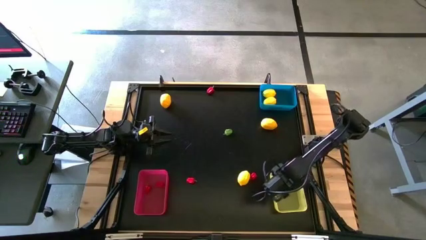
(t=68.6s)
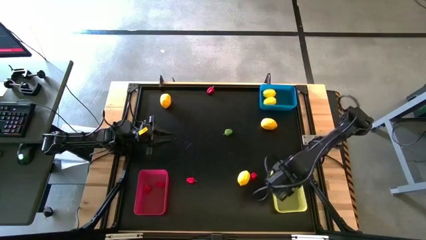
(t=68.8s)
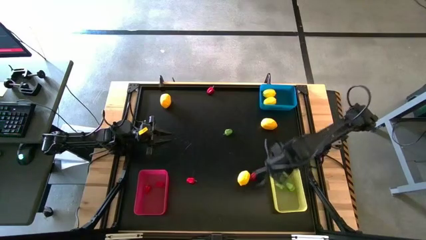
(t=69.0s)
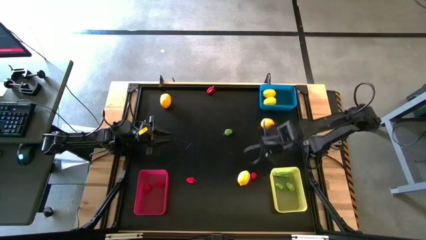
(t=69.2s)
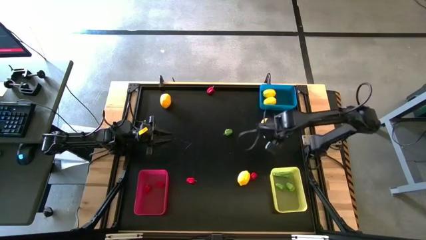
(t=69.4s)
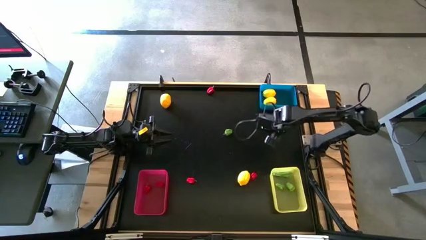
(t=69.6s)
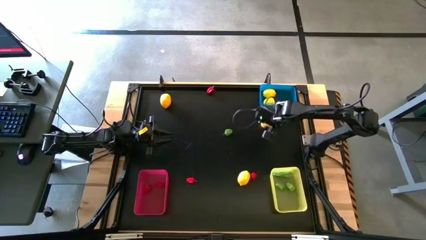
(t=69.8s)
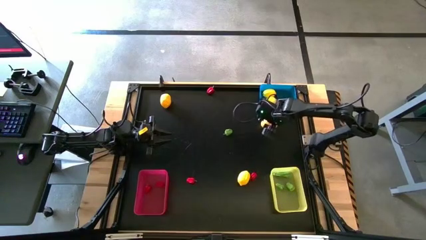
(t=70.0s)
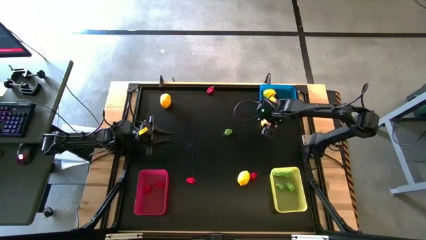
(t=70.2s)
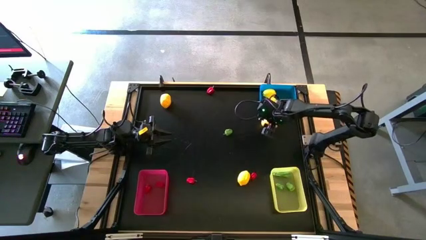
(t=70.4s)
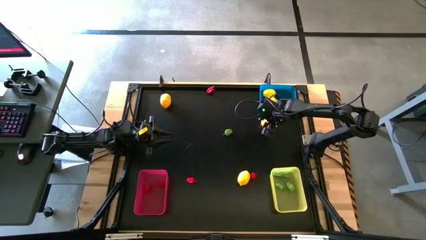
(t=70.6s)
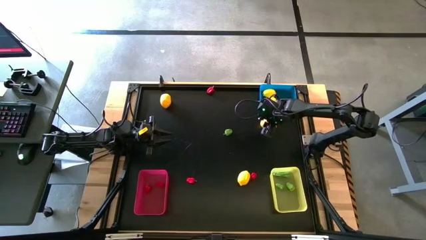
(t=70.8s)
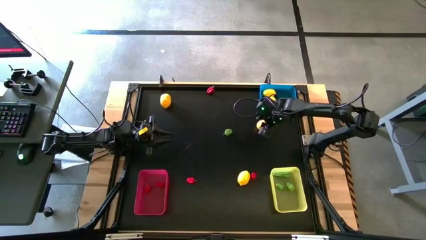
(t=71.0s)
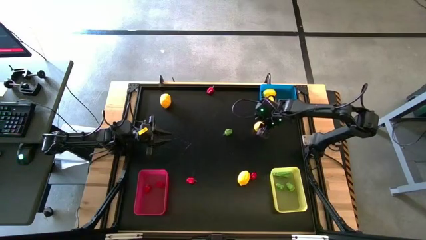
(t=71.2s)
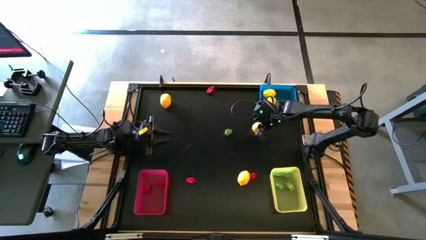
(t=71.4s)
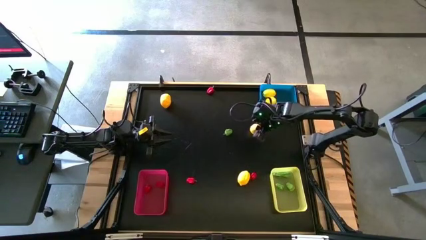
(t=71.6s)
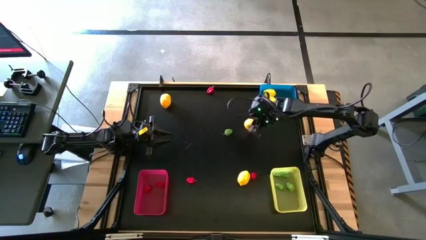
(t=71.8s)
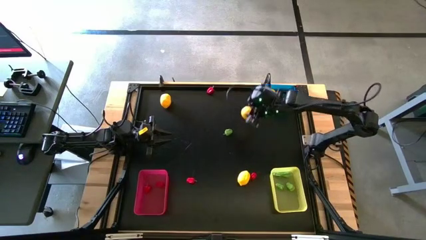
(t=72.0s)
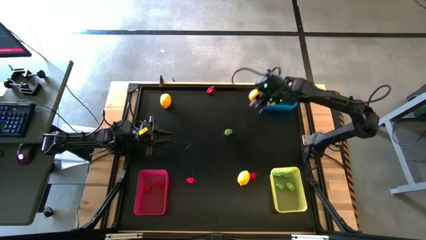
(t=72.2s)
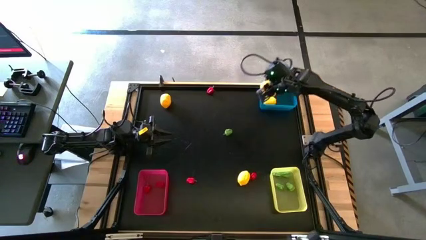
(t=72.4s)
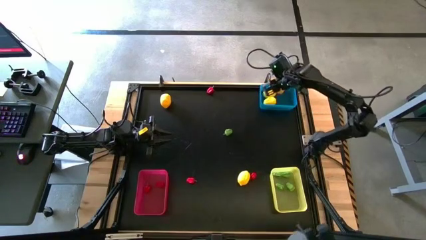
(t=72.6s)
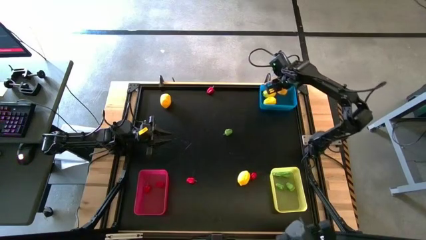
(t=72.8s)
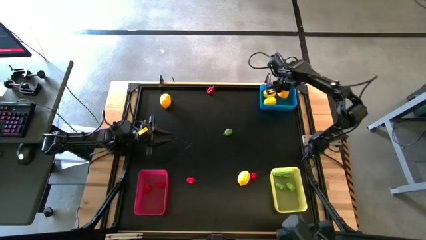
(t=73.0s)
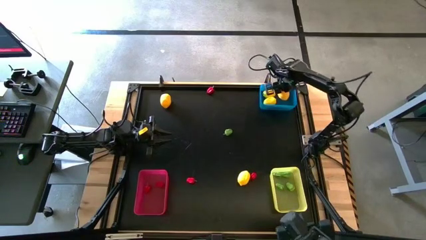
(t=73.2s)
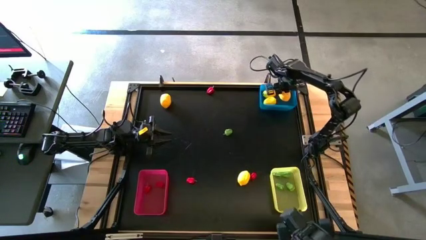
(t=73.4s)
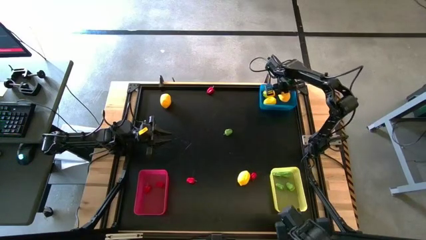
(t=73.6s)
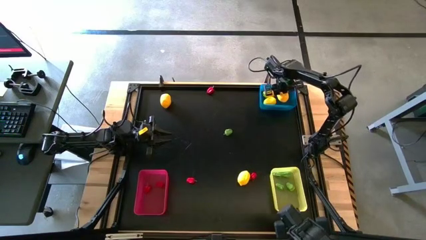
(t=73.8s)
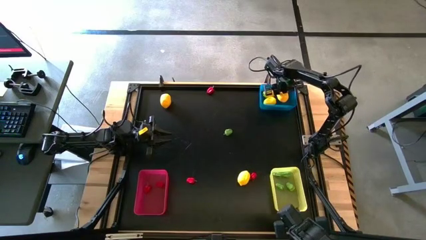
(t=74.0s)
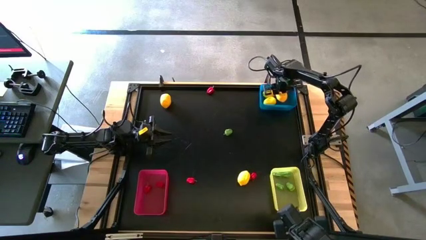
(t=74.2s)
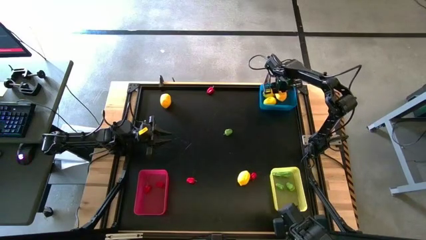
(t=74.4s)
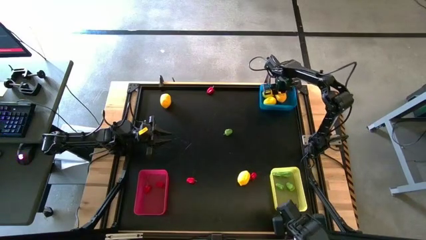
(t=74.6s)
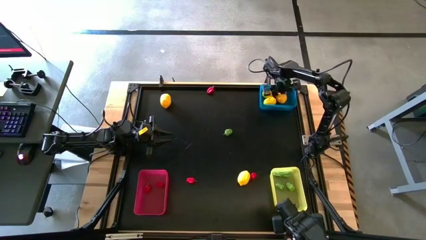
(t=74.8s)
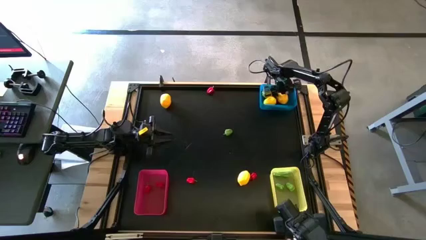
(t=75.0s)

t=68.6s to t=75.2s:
Task: Sort produce into baskets
Put the yellow lemon into the blue bin

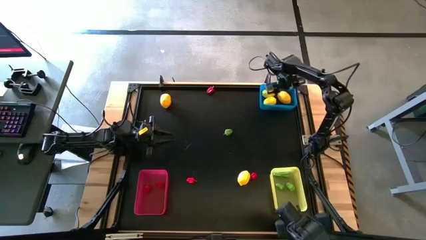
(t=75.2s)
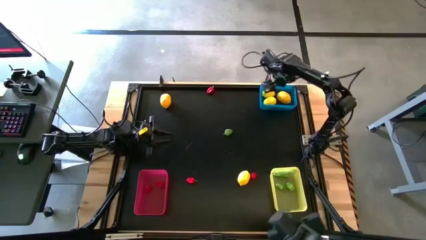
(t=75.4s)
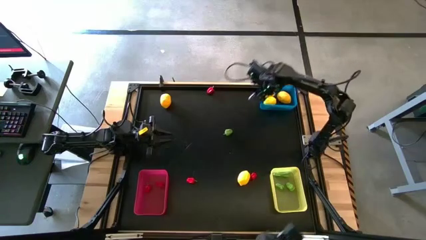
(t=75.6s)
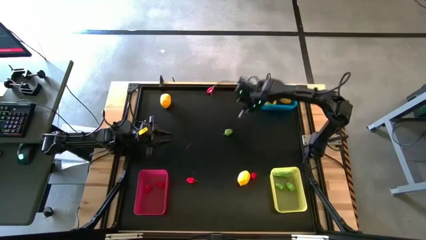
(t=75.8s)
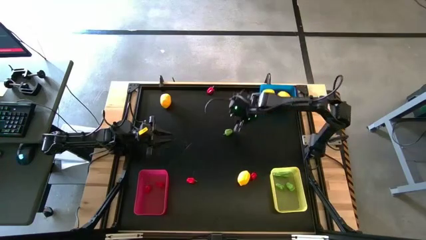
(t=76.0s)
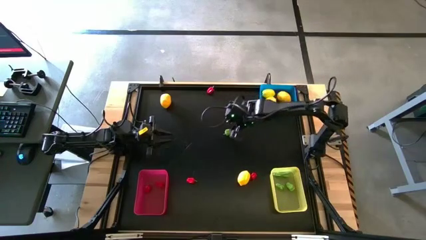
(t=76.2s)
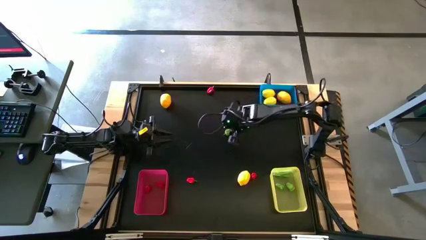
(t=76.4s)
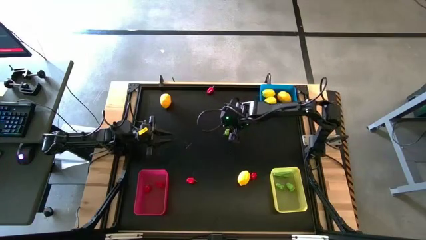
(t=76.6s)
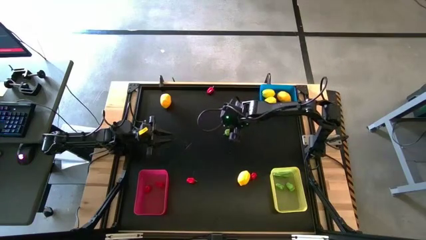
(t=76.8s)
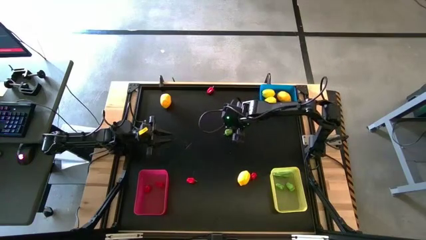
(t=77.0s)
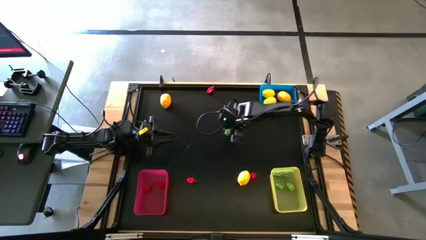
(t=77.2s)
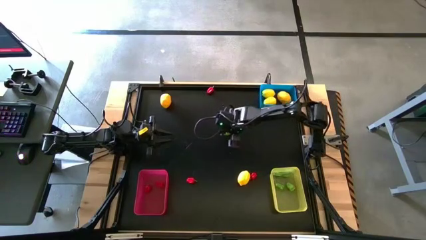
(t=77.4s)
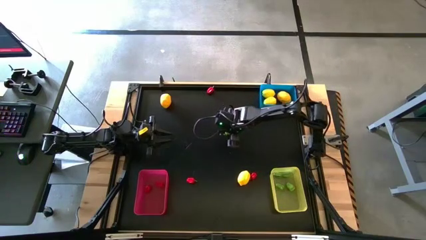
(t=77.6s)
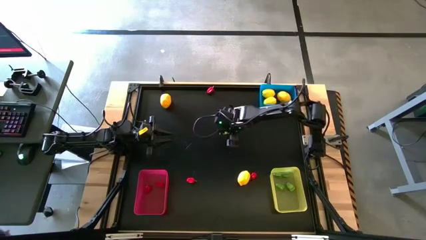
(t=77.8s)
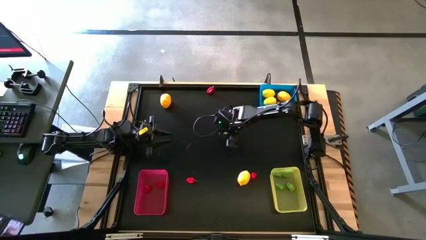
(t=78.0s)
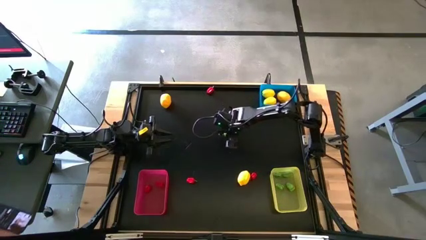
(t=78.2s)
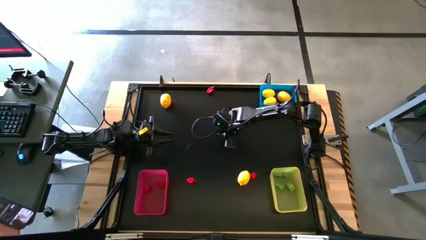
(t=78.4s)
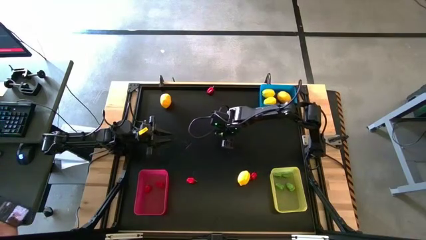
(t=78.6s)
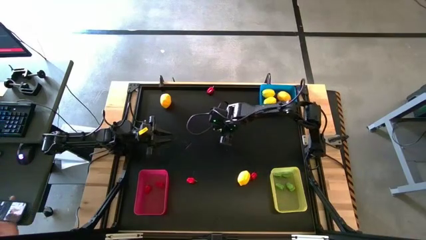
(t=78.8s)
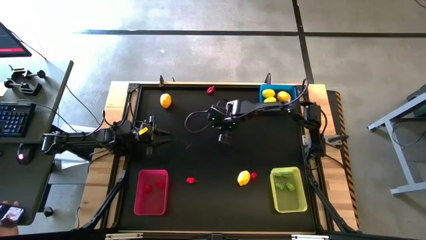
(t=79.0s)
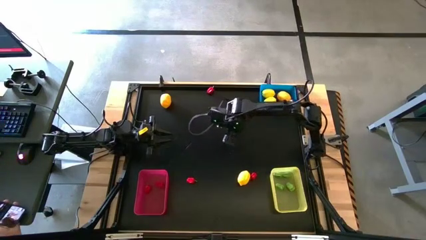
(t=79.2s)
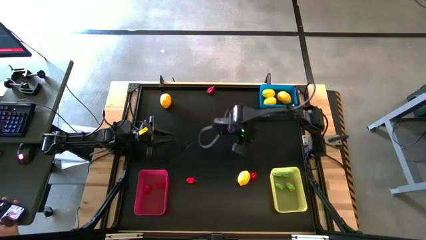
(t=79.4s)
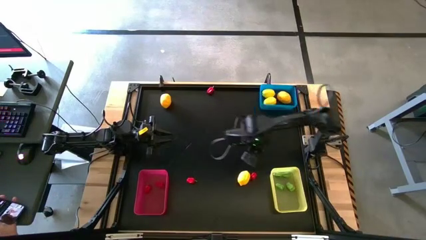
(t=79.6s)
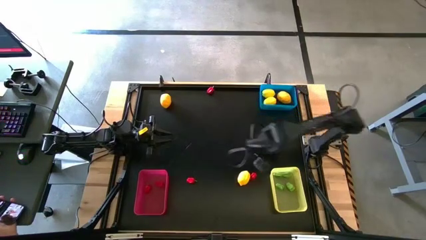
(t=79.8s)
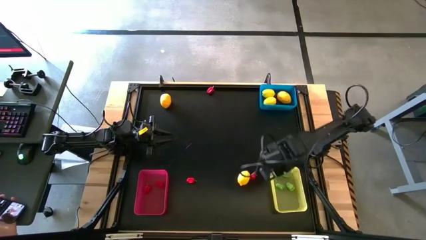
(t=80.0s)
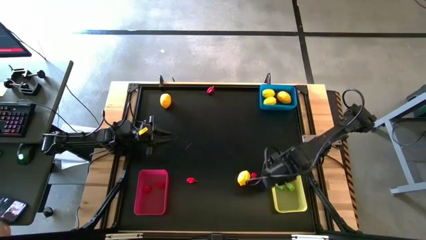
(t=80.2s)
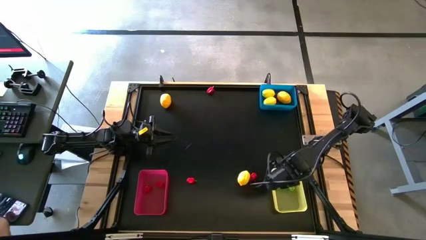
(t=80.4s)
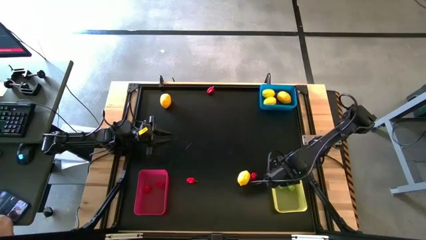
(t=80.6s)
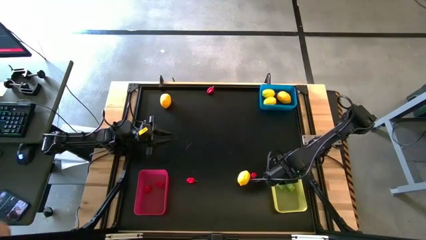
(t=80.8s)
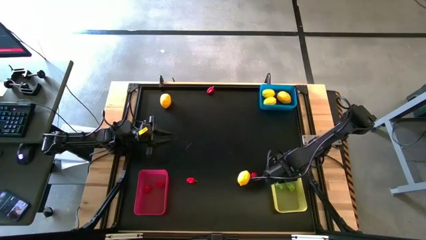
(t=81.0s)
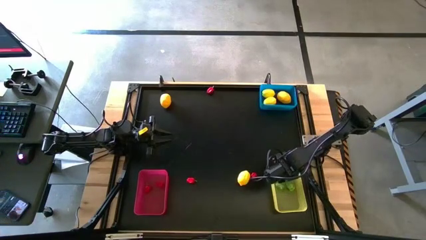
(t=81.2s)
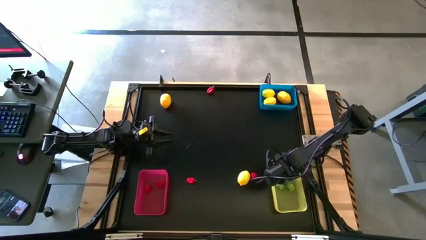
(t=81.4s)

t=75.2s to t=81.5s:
Put the green chili pepper into the yellow bin

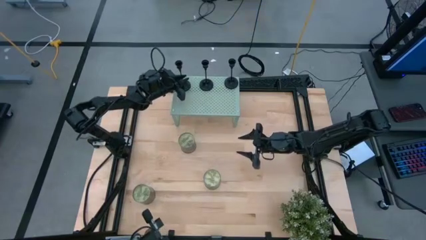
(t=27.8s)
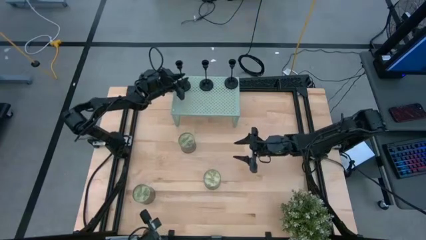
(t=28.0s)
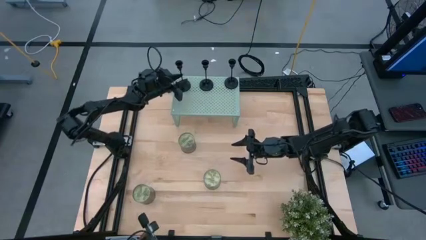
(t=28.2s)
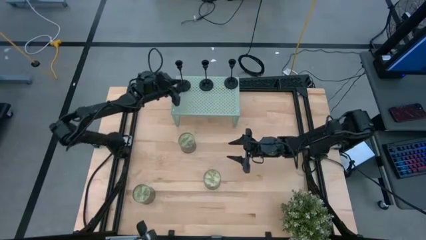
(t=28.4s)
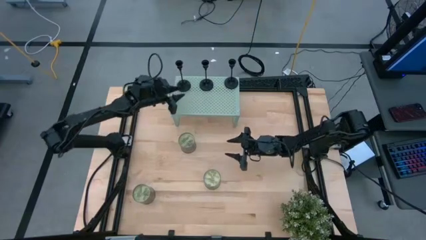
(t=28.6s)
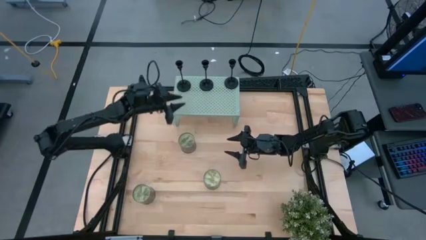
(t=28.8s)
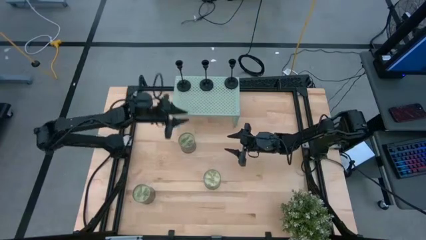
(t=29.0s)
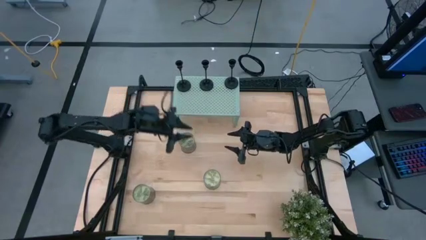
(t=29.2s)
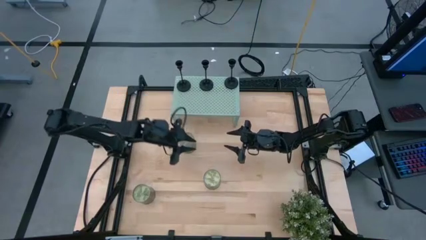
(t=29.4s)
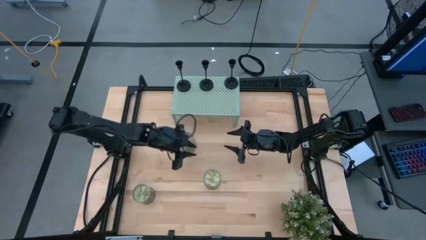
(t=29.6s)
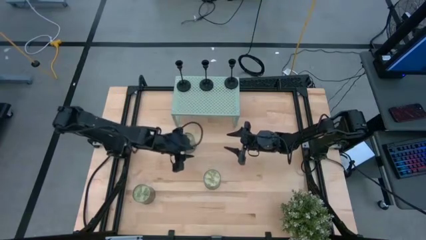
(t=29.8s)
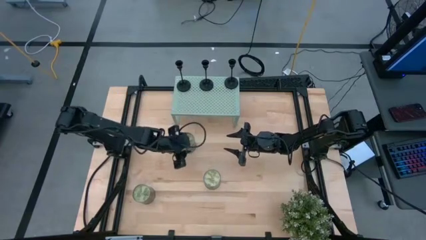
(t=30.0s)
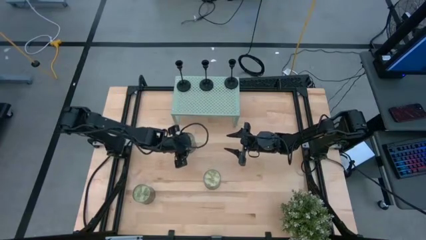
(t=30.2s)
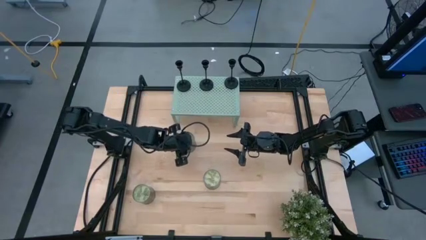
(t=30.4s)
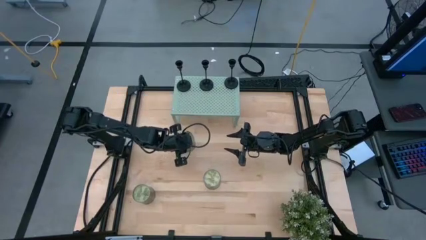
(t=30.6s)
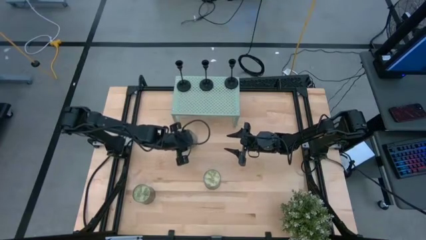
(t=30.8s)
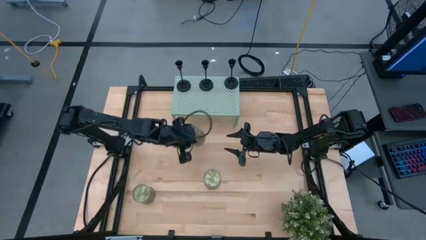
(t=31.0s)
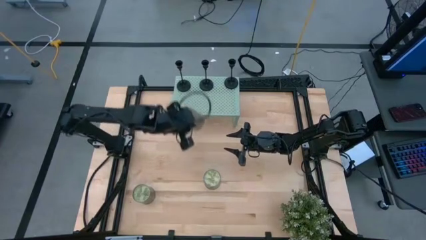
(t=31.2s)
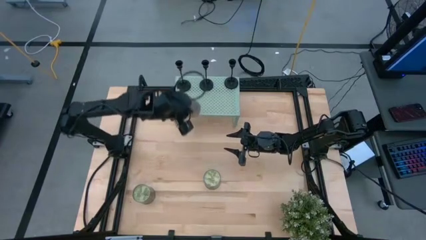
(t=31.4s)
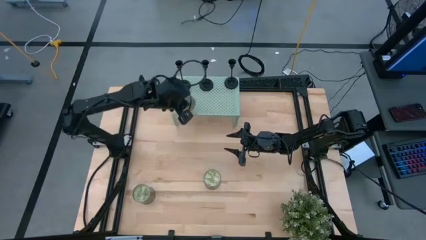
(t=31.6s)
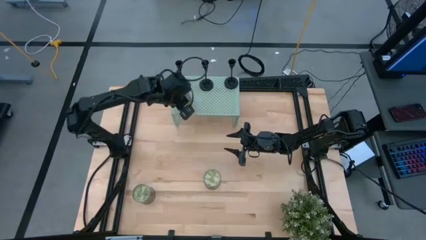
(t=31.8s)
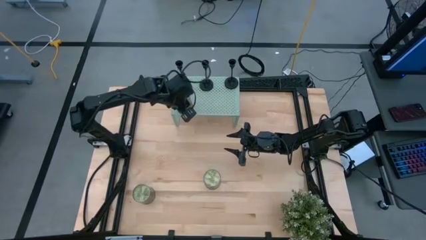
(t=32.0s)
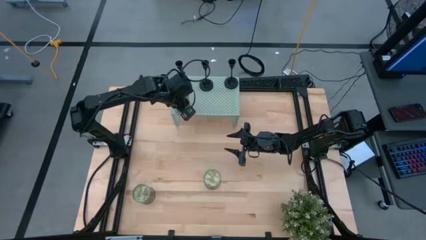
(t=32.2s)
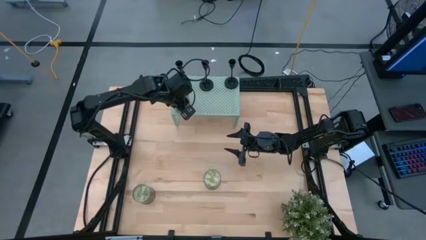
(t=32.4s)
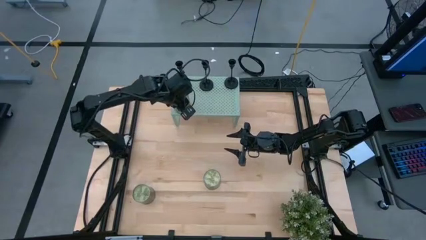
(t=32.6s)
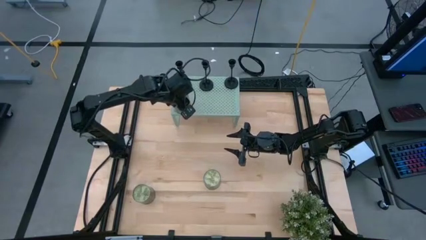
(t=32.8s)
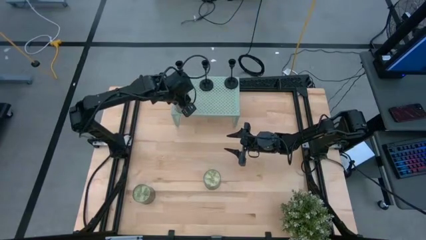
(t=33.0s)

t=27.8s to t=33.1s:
Task: Pick & Place candle stick holders
Put the top scented candle on the shelf
